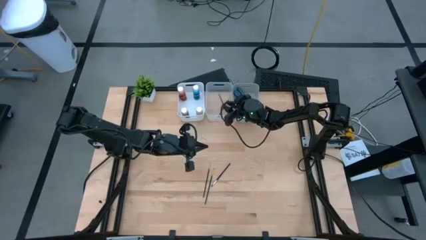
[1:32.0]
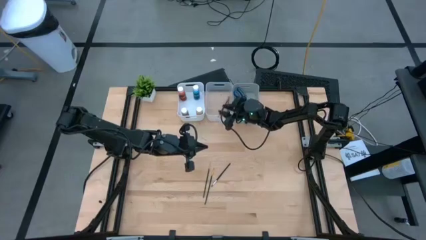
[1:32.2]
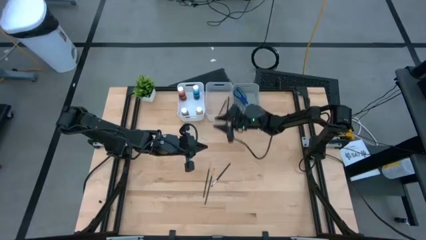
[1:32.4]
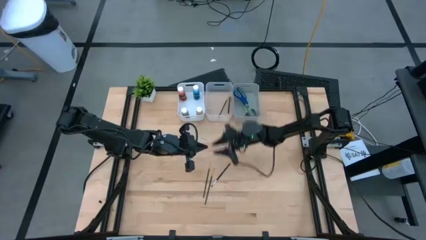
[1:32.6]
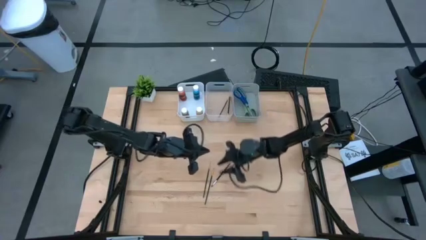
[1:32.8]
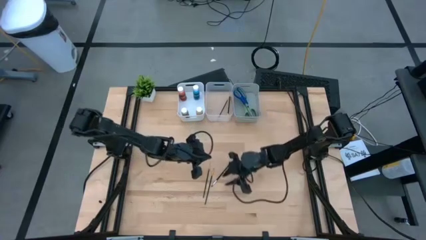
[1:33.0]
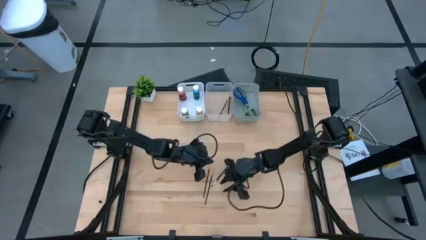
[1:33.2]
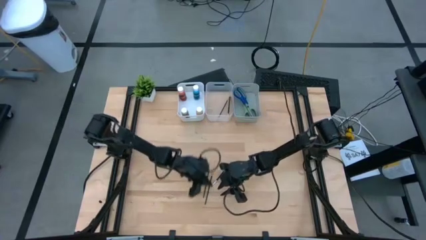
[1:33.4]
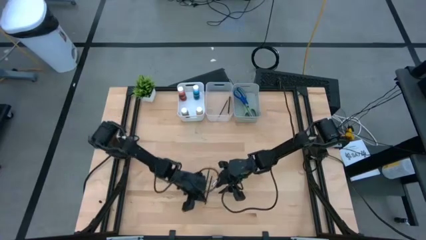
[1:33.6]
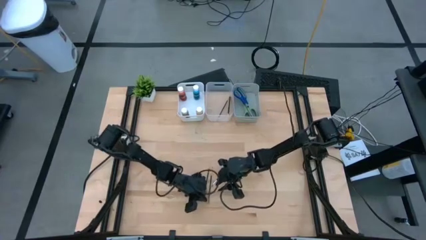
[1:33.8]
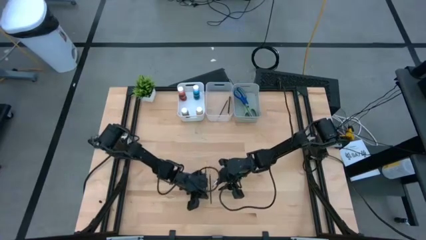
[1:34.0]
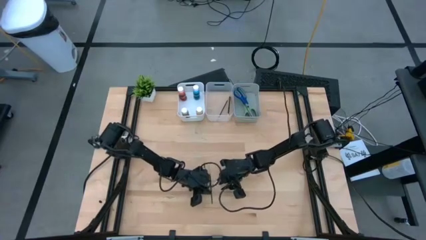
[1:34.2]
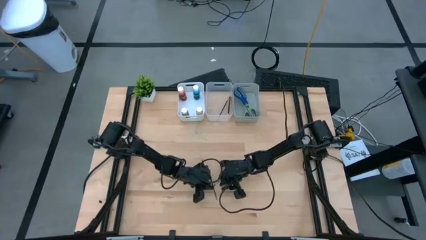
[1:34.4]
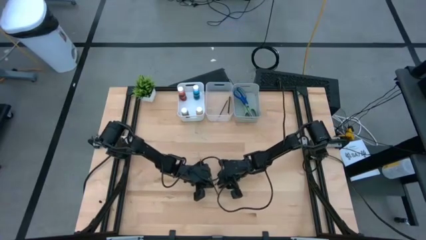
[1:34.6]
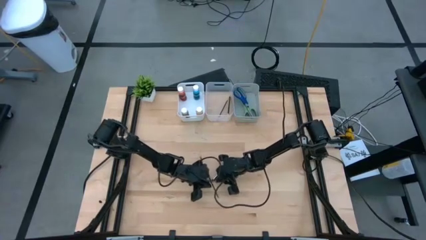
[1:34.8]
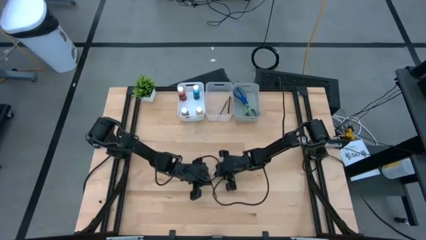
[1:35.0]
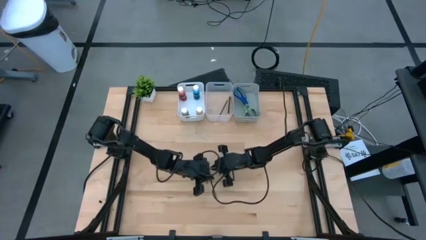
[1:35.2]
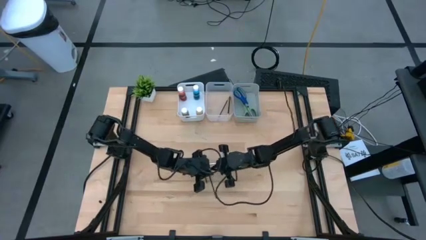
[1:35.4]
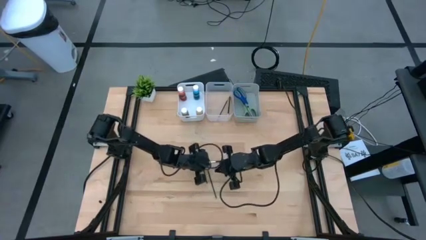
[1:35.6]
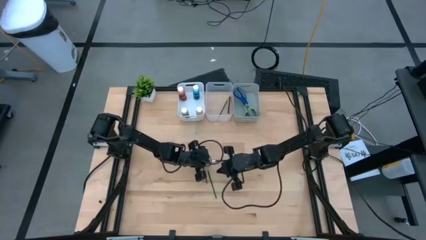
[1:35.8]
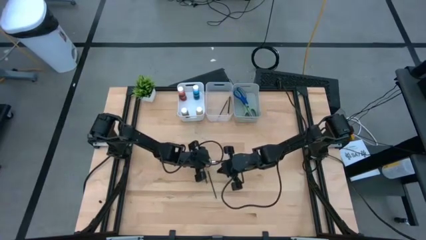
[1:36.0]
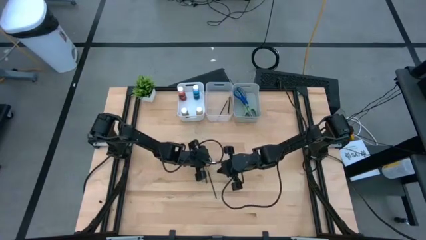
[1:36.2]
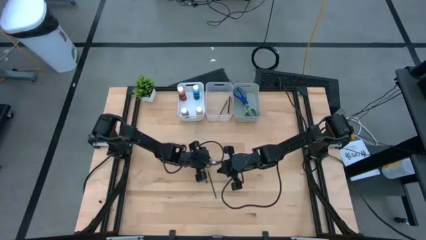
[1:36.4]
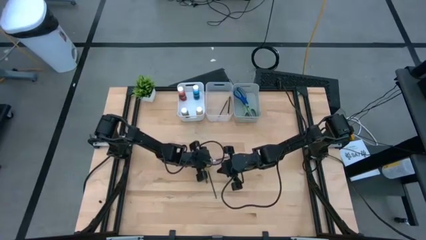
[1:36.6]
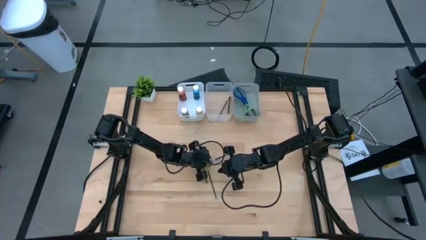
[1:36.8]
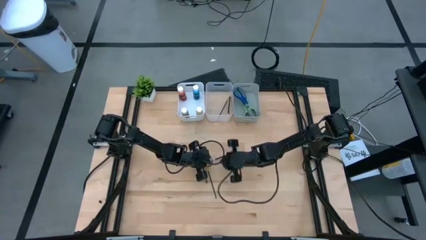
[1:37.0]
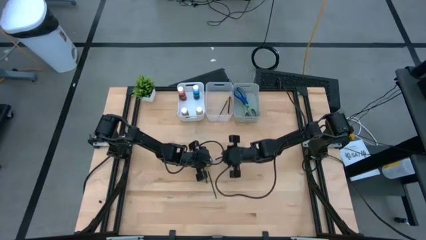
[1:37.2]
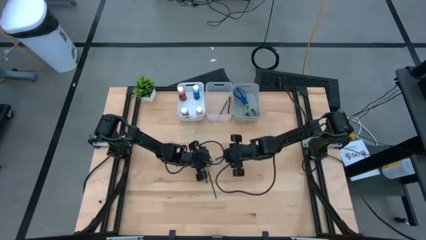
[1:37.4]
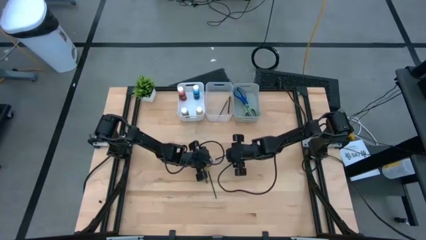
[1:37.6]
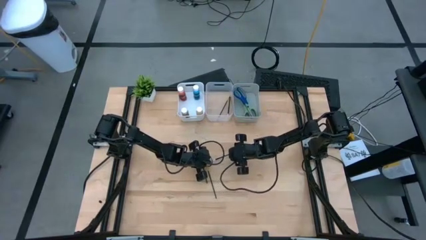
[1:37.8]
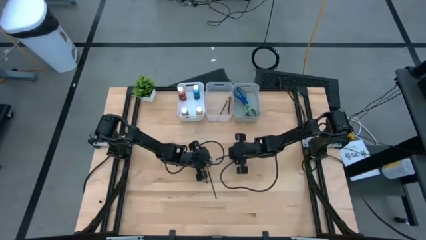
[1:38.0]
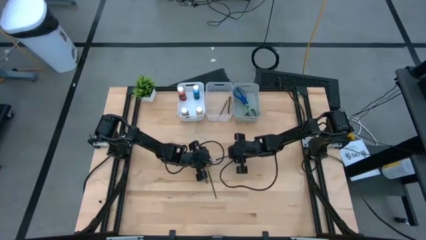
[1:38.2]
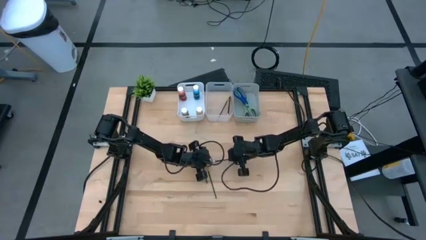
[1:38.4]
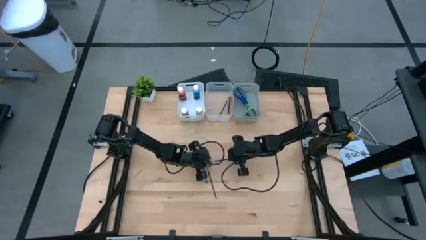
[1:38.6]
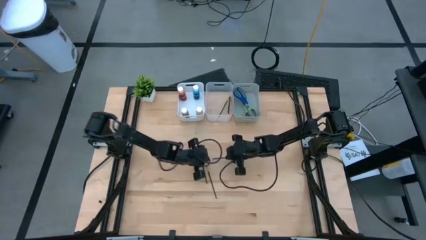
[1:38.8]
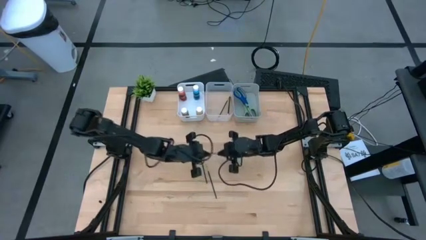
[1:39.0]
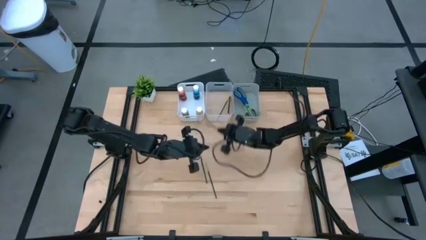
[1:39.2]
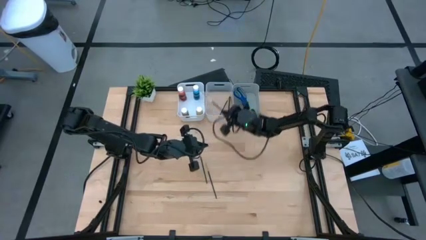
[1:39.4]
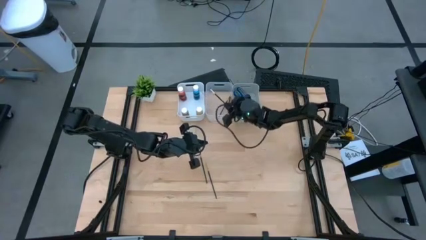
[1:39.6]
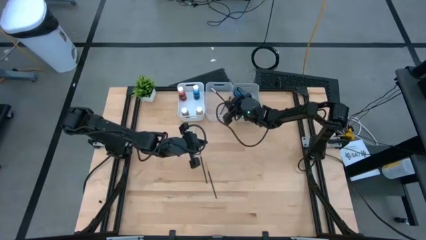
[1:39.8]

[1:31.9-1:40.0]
Task: Pick & Place Paint Supplies
Put the silver paint brush into the transparent bin

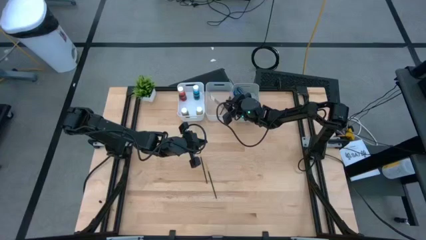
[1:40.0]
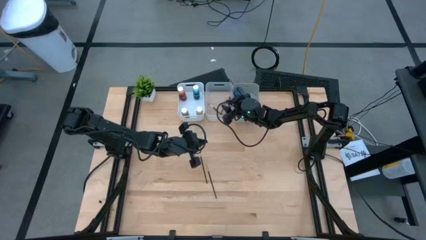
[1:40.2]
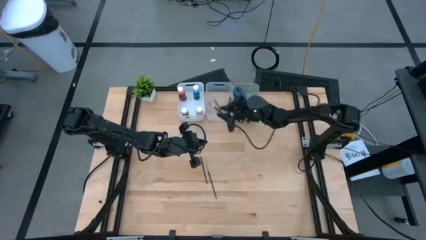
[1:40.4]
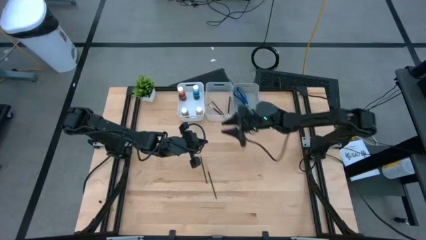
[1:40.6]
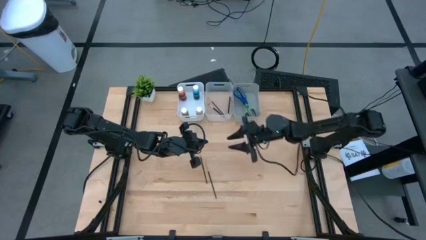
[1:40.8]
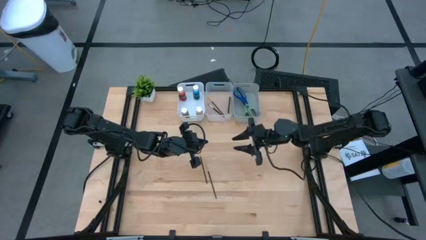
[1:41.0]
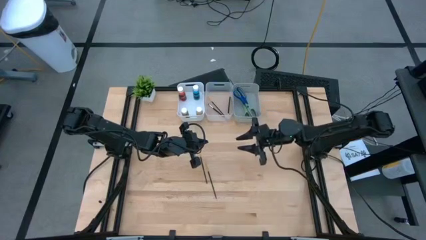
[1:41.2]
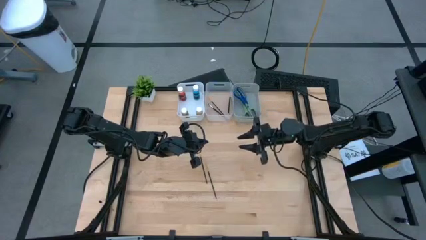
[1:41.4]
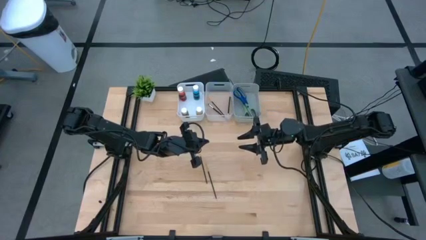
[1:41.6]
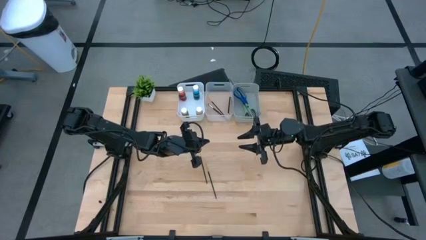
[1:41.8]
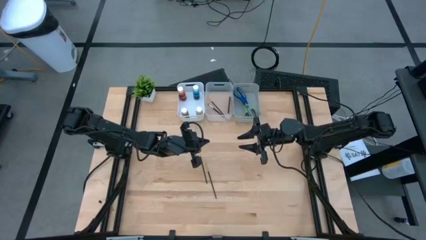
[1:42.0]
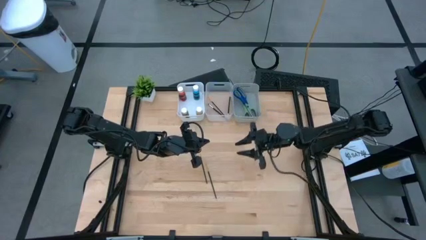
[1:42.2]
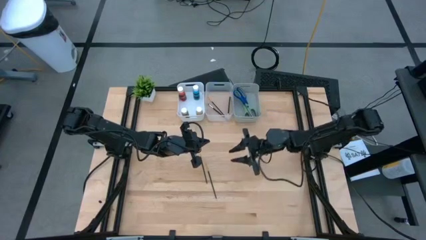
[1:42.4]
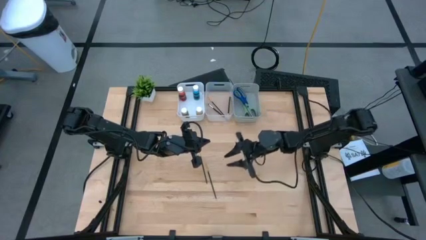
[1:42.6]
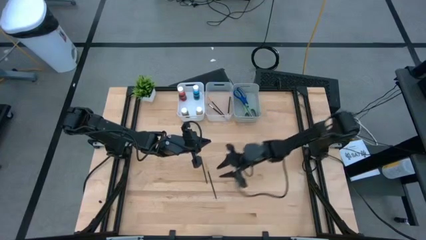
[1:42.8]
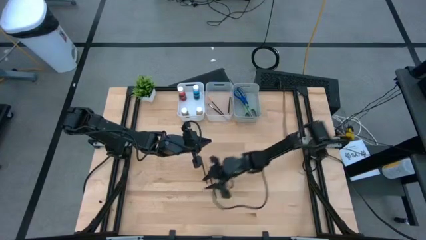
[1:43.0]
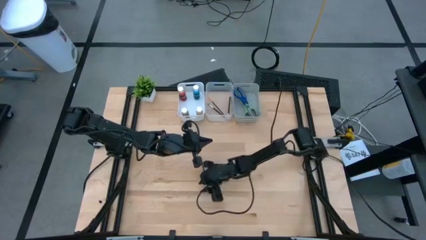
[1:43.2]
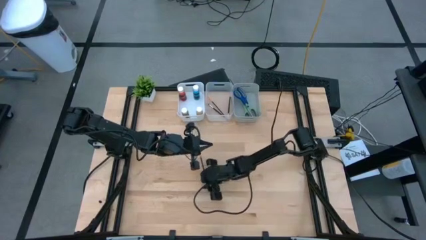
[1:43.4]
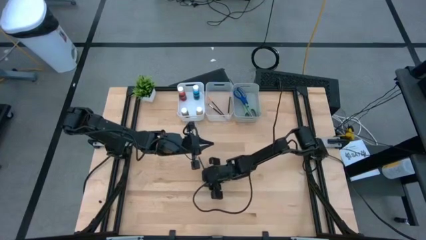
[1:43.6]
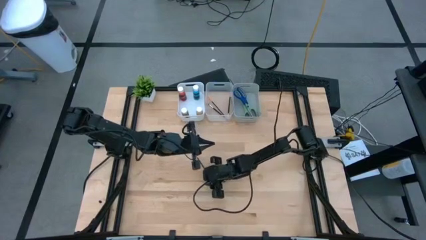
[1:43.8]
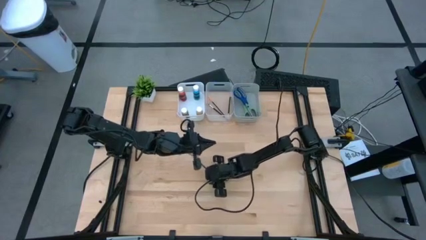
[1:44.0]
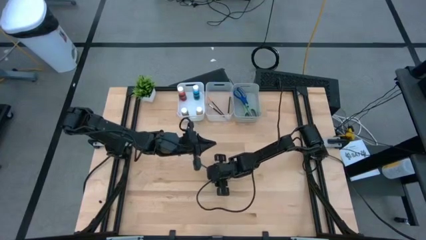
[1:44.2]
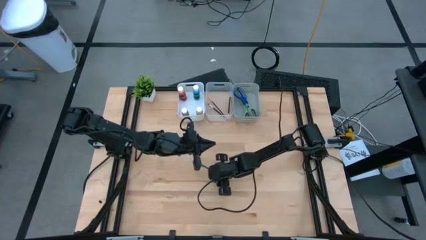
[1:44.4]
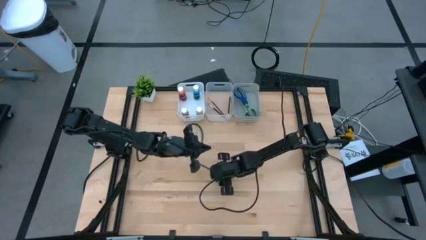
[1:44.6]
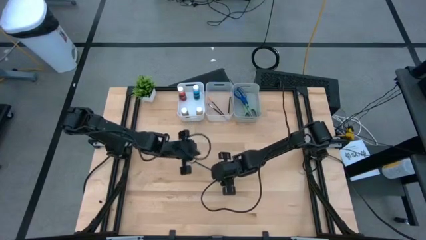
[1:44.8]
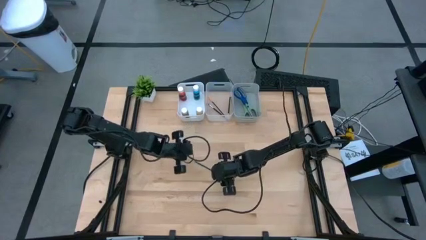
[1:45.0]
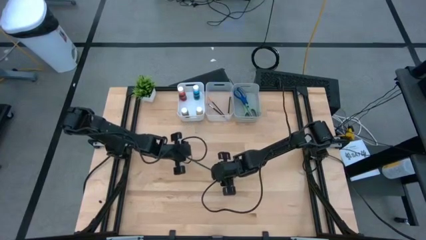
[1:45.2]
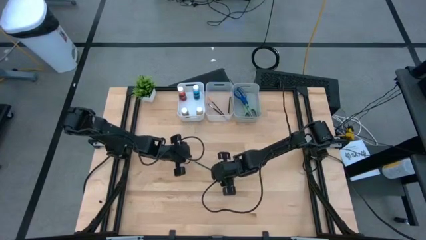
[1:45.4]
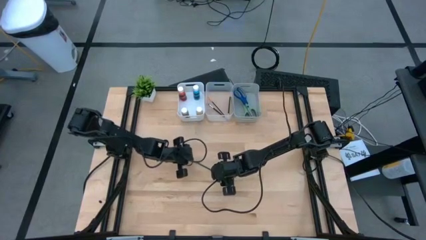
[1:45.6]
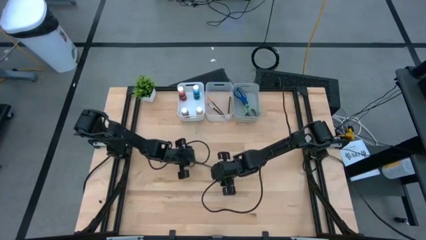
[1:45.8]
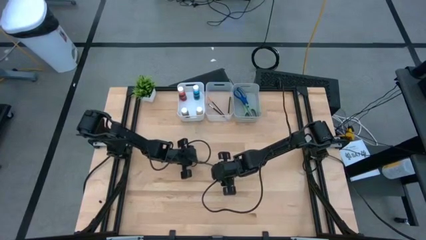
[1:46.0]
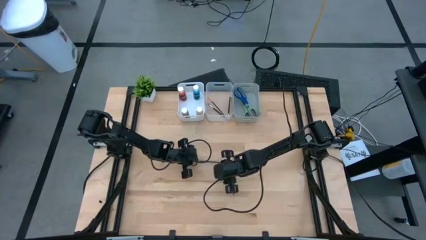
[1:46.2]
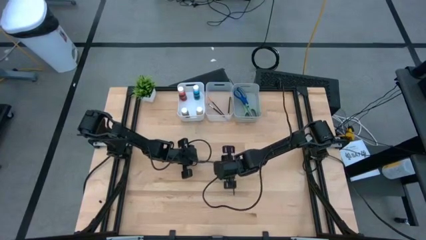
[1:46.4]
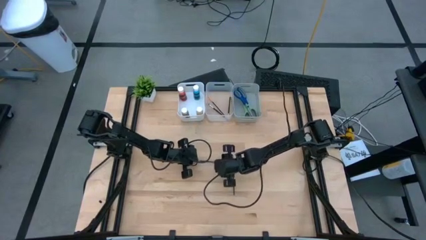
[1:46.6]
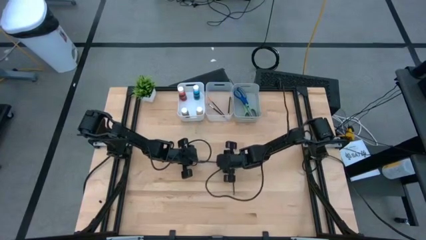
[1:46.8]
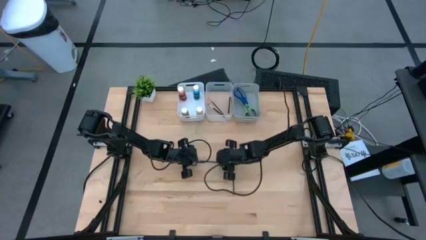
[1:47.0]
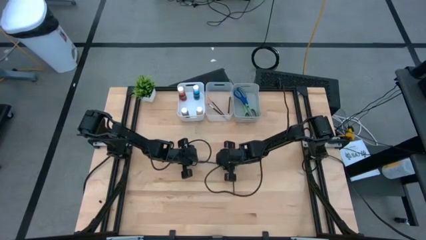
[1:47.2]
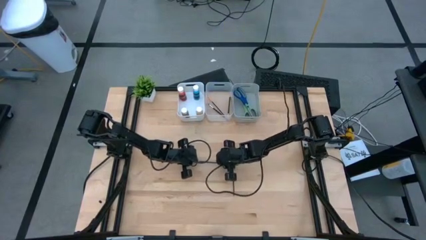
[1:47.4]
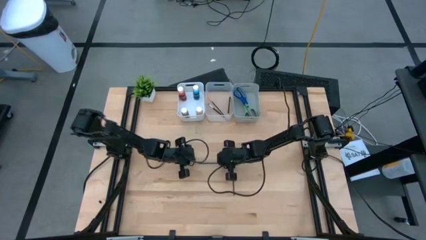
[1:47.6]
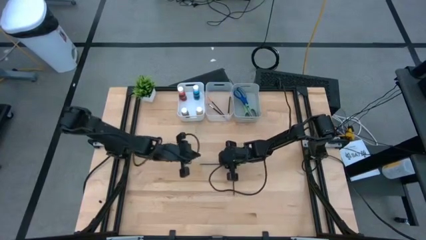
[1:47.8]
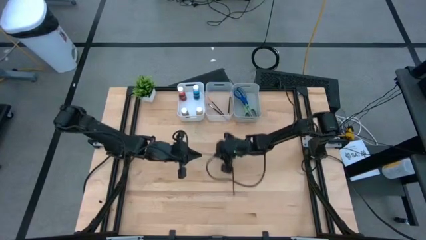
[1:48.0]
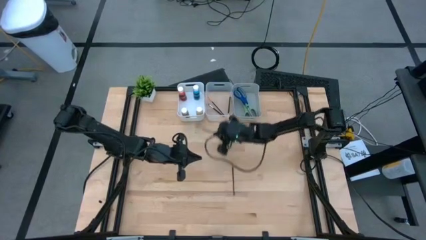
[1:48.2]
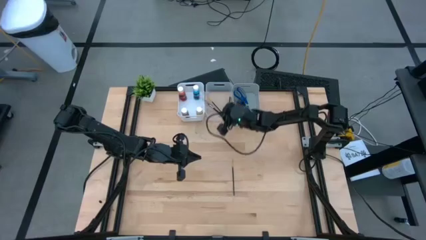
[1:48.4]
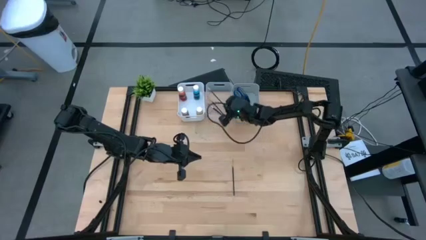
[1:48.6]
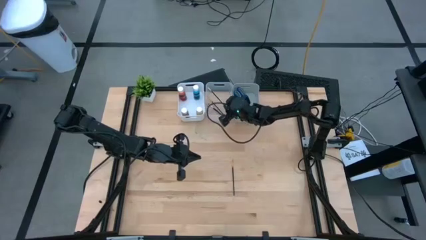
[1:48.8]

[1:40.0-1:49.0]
Put the golden paint brush into the transparent bin
